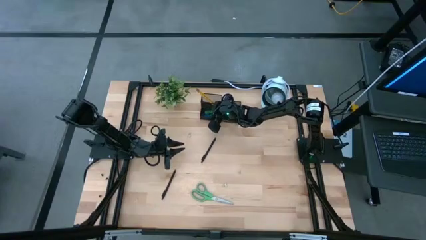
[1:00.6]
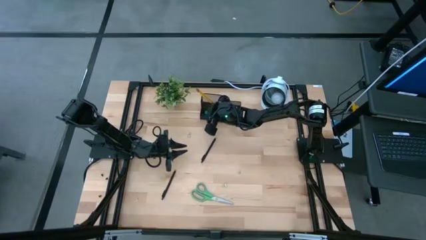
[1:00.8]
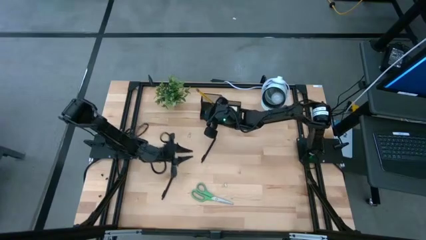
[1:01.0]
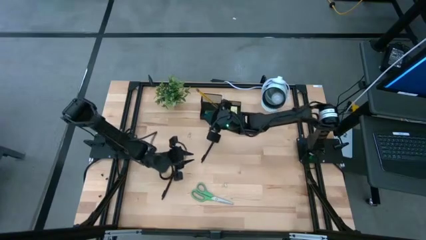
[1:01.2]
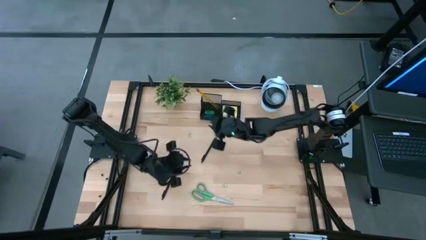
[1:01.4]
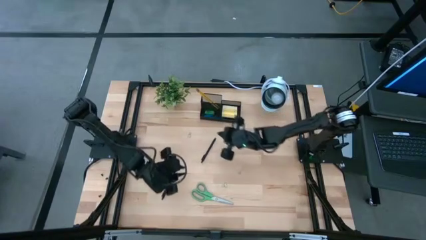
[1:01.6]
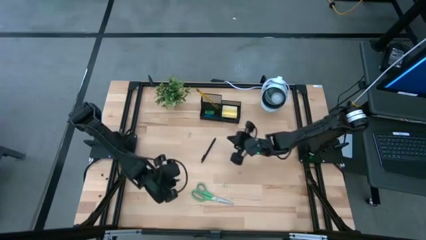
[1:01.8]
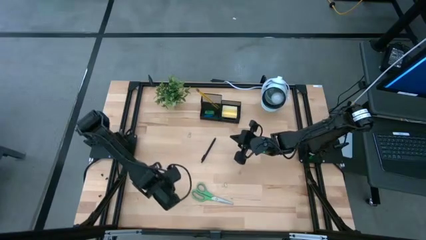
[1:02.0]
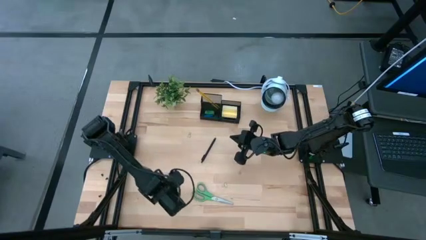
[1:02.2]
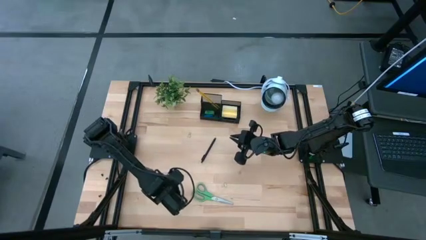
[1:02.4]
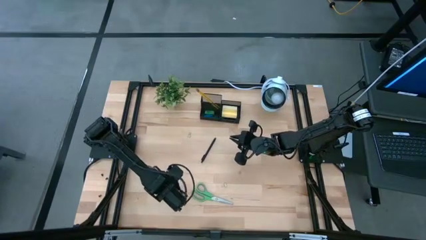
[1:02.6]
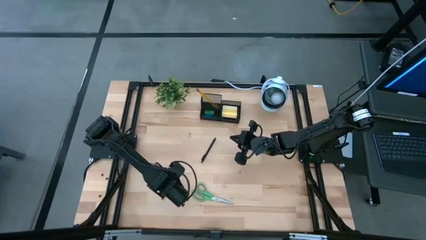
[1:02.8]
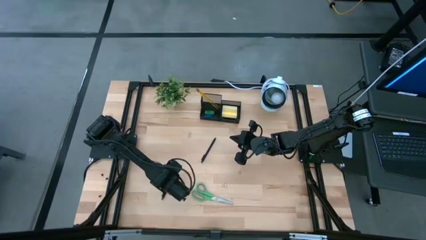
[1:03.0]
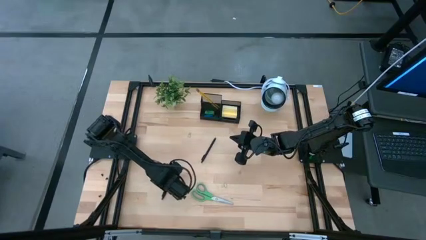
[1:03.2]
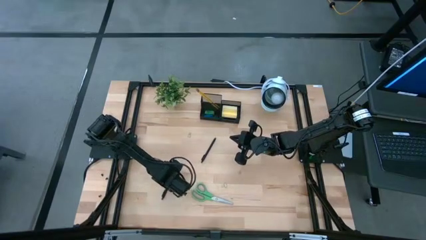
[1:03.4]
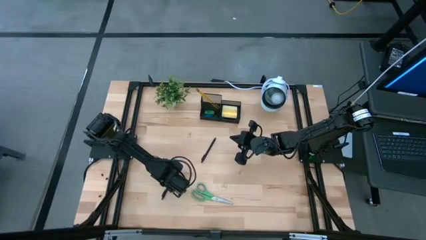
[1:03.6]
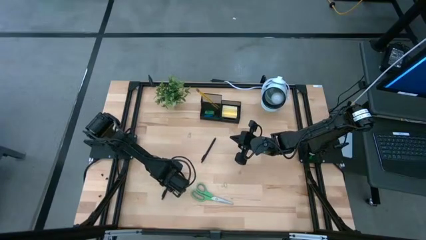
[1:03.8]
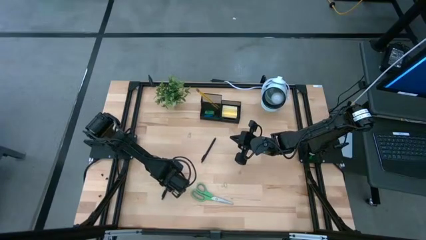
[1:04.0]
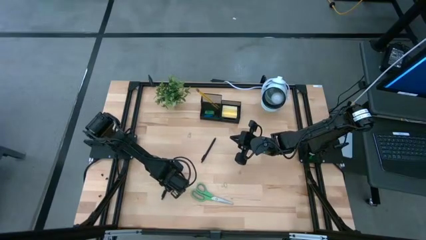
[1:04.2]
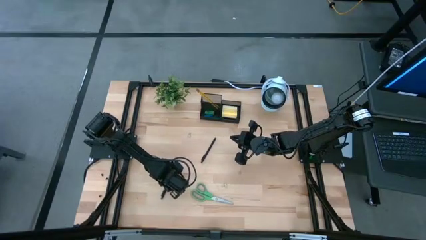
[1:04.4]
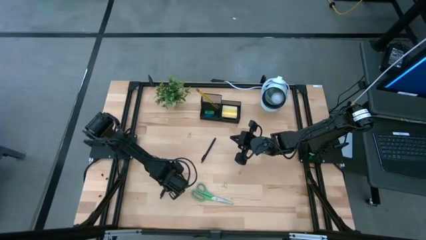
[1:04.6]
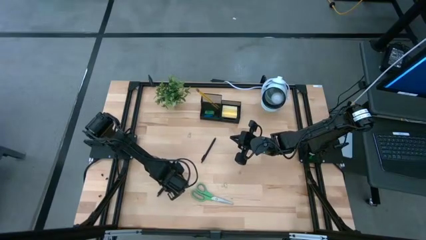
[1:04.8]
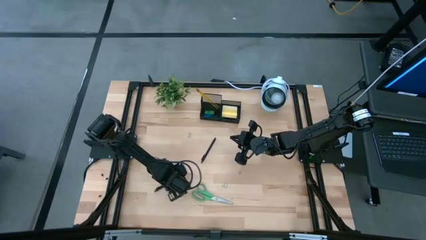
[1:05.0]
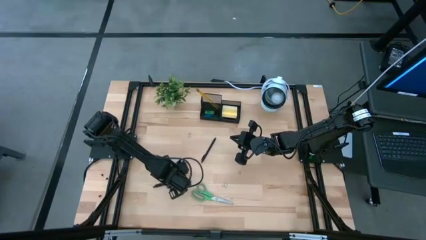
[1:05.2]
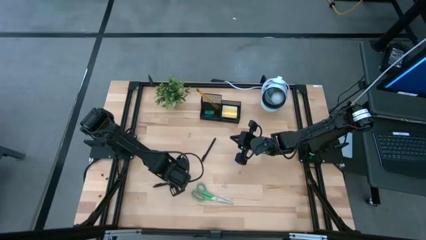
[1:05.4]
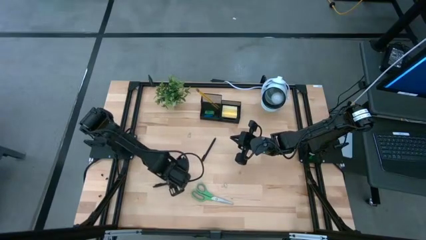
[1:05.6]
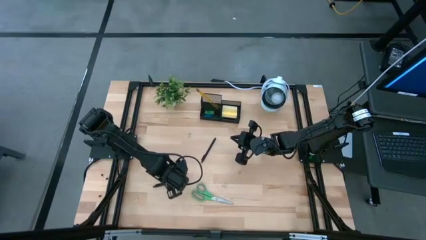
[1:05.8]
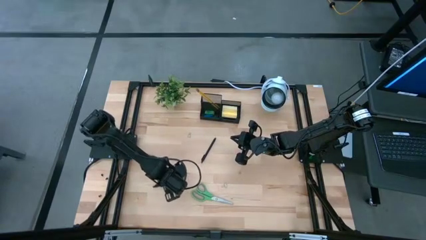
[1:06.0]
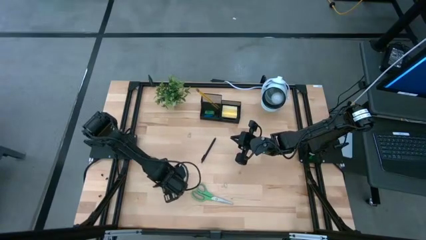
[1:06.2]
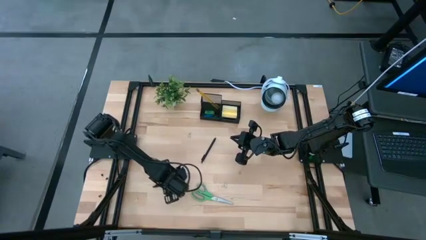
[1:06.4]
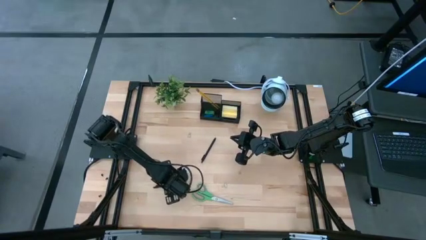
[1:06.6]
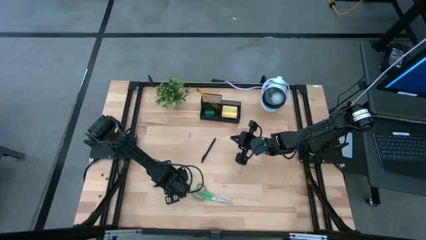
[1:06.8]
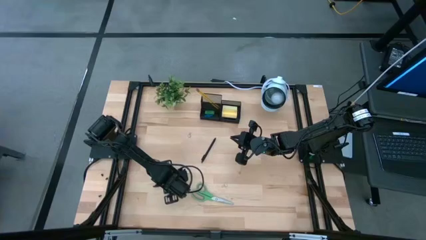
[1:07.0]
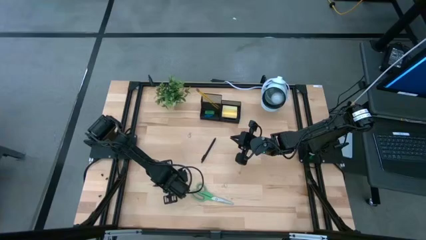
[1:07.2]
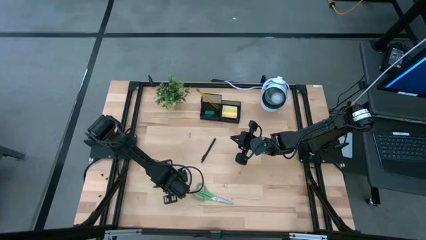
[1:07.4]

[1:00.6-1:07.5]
Task: Pick and place office supplies into organizer
Put the bottom black pen into the black organizer

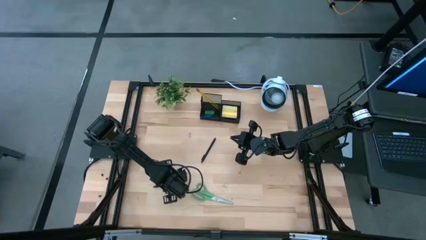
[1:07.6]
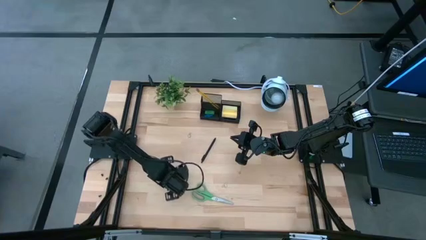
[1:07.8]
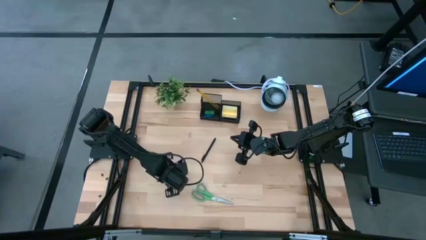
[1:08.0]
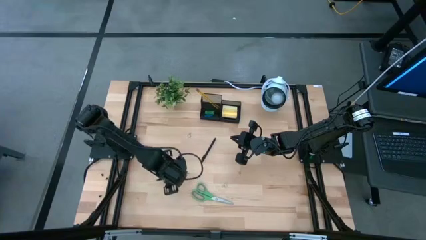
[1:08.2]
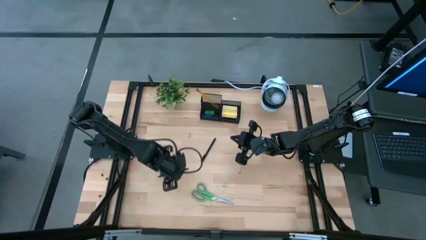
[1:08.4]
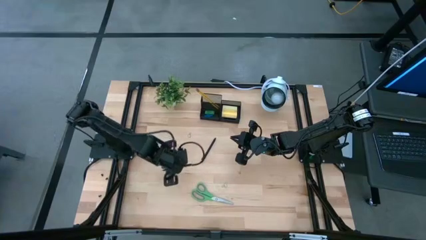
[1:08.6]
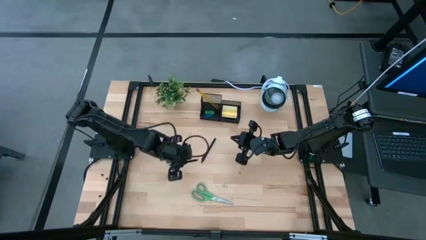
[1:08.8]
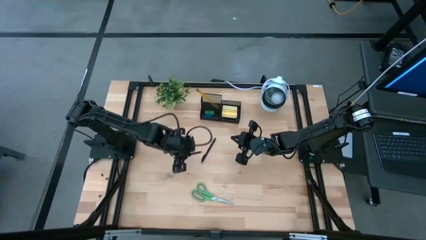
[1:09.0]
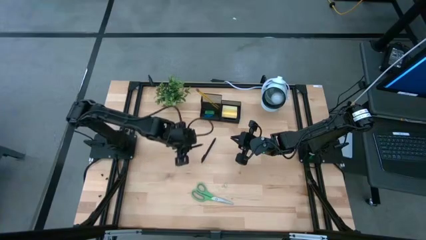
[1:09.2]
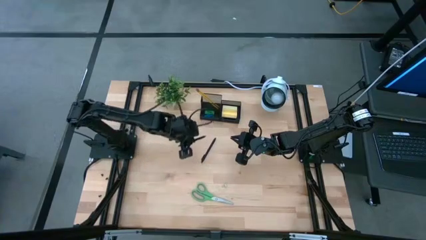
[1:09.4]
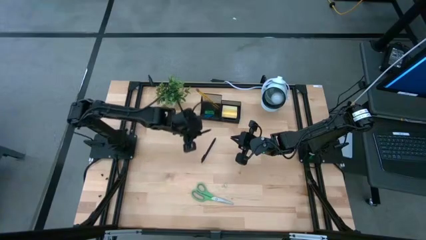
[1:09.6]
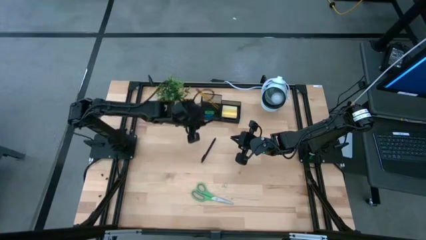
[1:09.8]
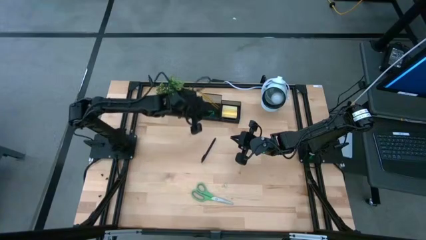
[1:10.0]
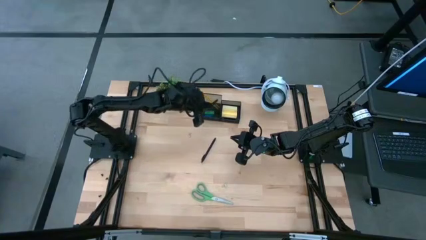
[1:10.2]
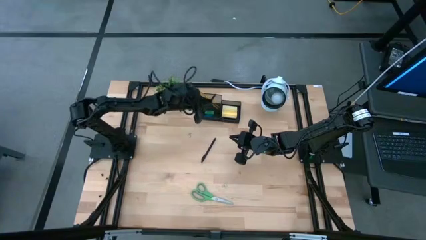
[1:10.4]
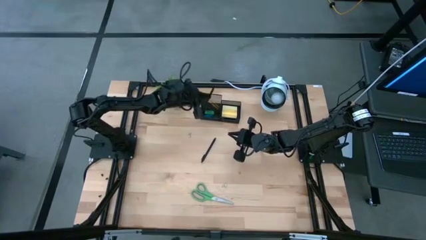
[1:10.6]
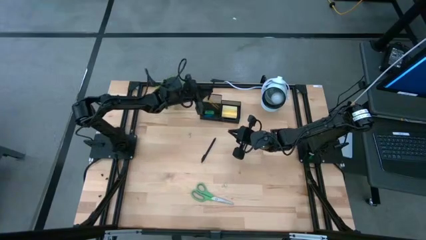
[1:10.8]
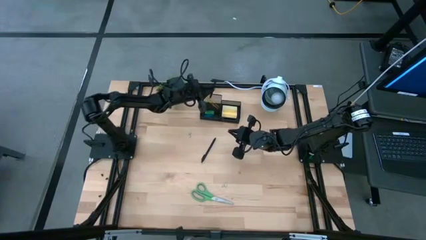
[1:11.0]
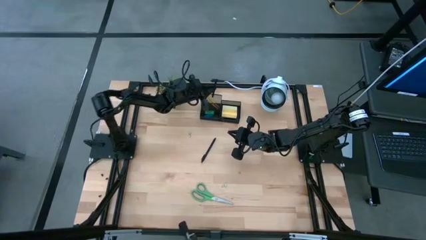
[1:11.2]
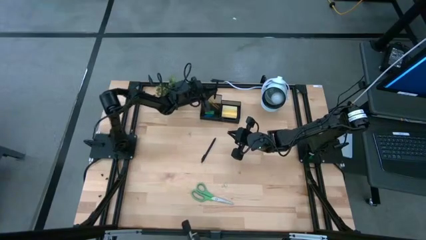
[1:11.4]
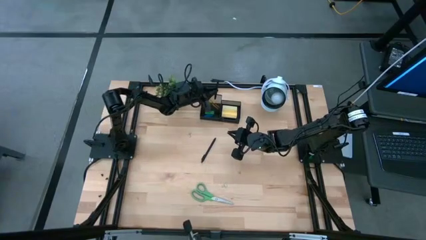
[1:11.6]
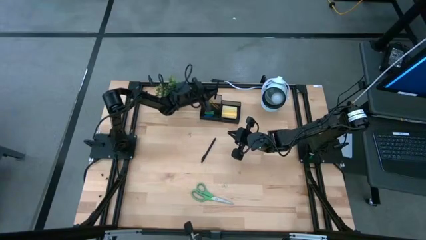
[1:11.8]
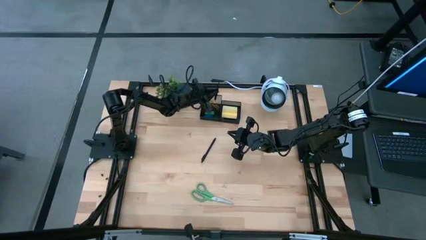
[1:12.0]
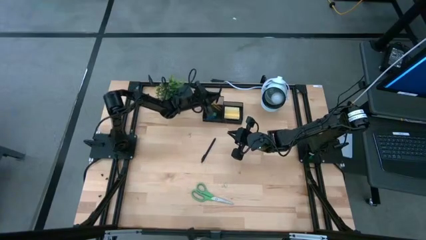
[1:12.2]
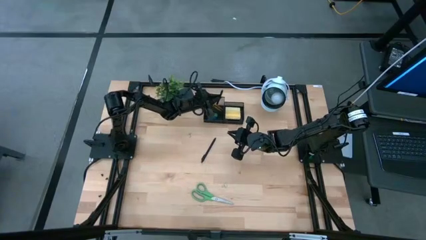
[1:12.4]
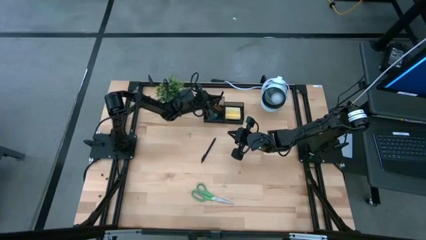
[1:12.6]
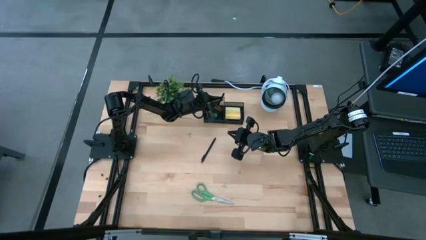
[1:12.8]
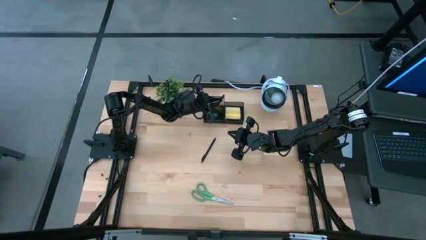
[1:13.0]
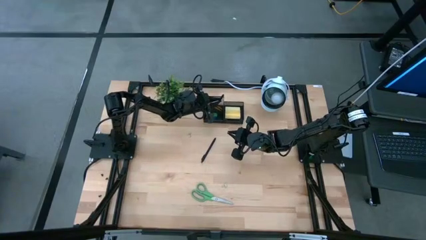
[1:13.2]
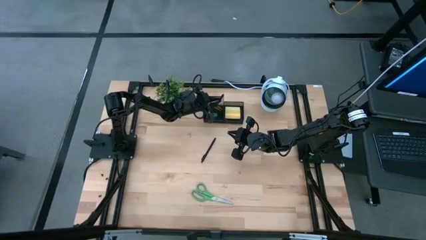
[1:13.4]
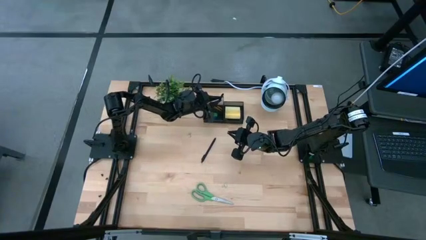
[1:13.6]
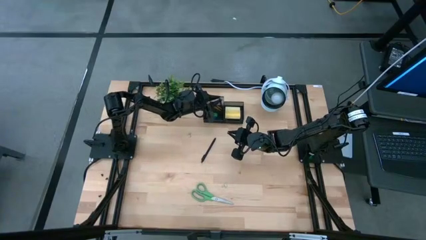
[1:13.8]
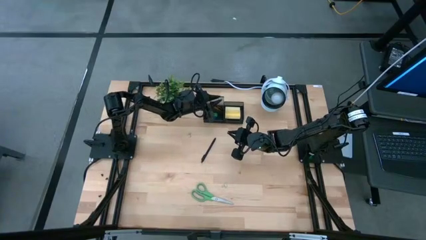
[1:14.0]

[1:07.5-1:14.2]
Put the bottom black pen into the black organizer

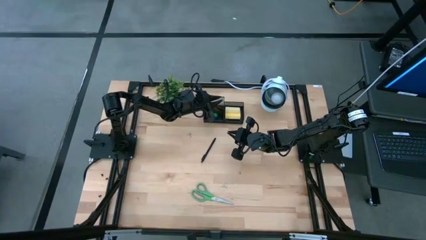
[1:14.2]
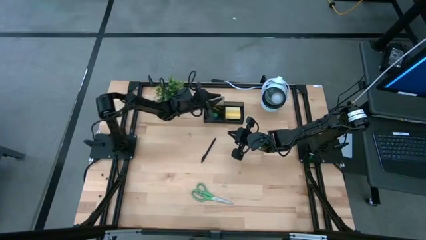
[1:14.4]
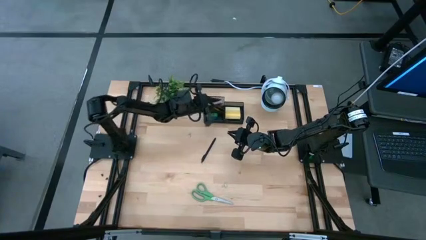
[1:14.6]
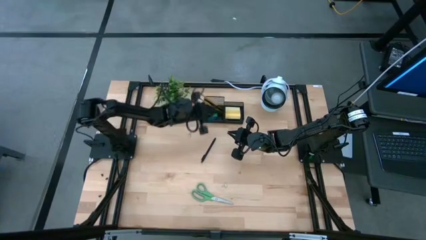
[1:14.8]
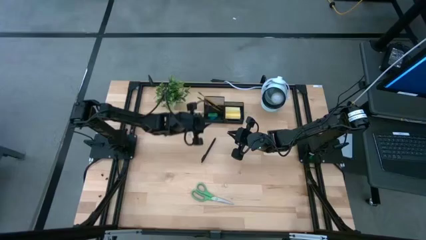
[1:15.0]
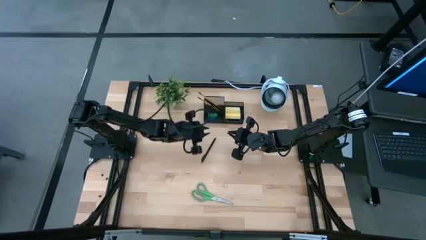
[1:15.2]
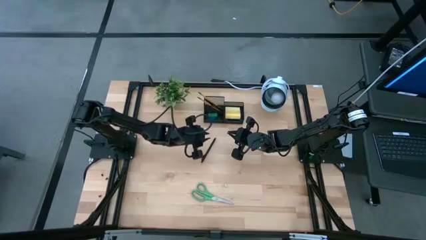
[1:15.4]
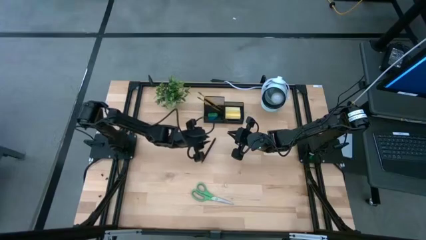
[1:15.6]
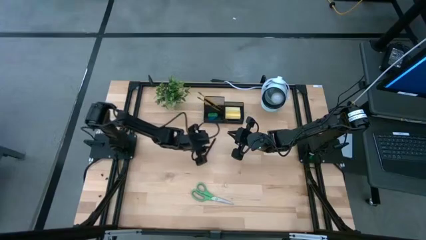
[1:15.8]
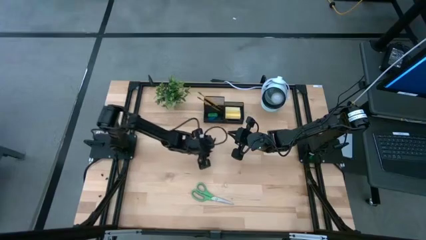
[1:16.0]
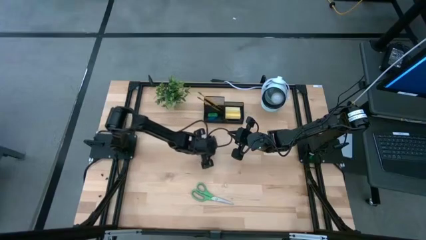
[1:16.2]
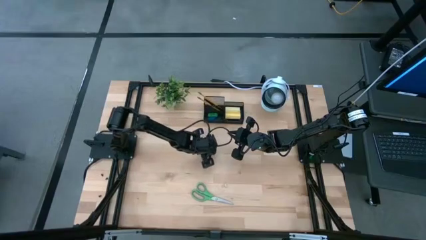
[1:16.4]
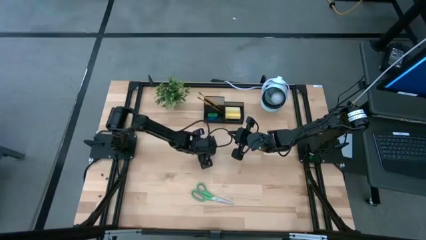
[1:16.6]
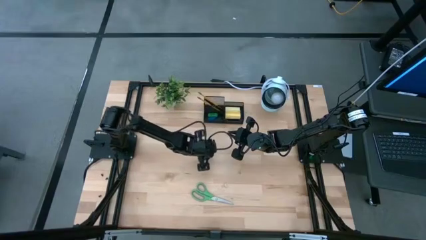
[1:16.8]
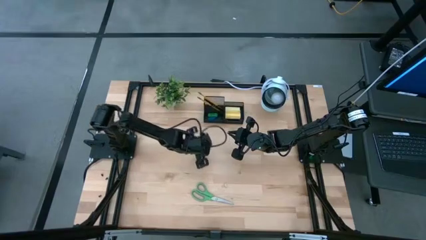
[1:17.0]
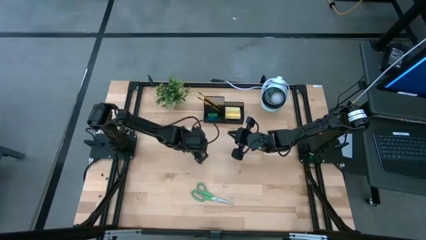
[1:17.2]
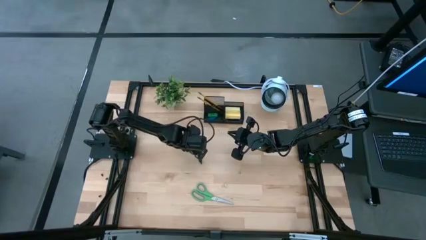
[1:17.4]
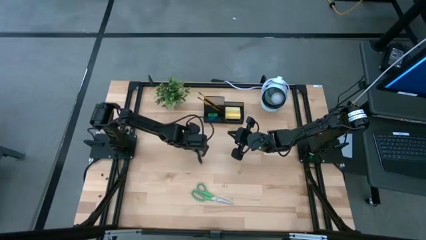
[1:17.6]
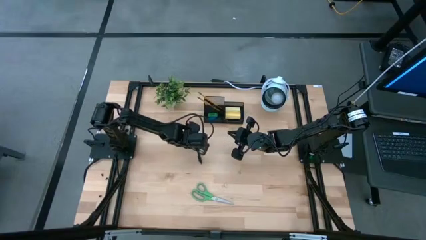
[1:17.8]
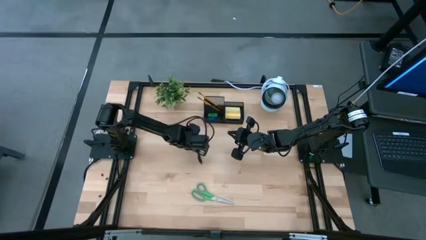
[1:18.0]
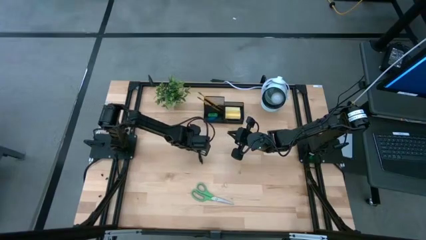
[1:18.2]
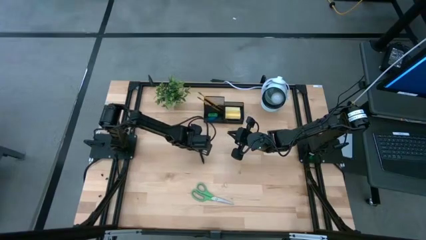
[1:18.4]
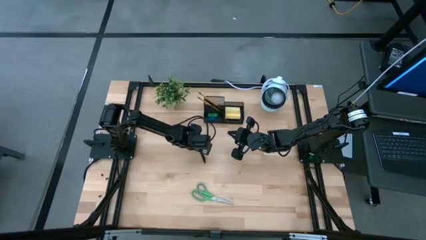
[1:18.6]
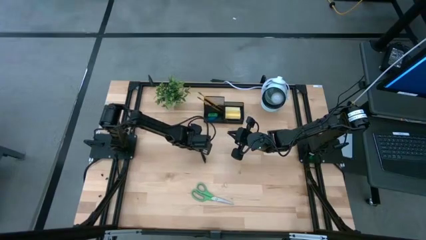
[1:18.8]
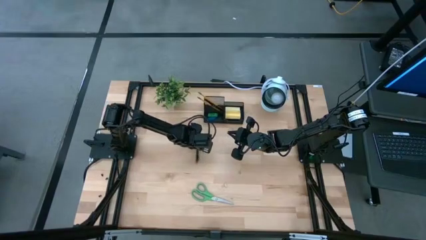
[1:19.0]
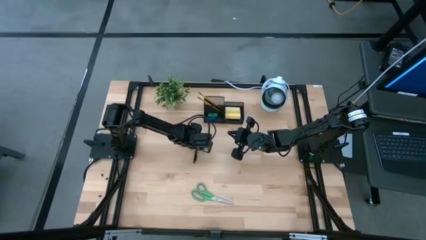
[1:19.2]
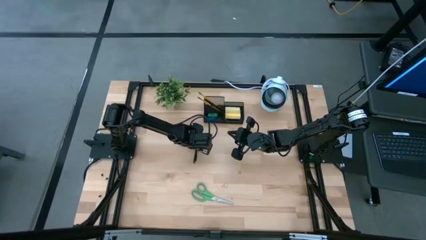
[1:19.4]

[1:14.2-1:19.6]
Put the black pen into the black organizer
